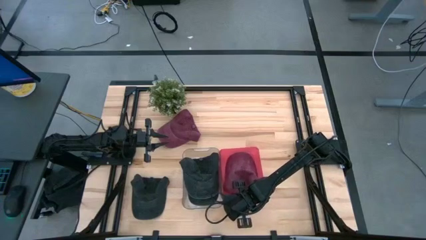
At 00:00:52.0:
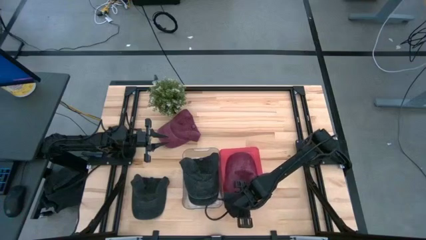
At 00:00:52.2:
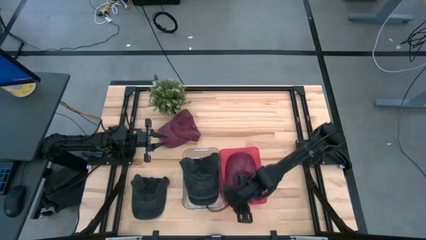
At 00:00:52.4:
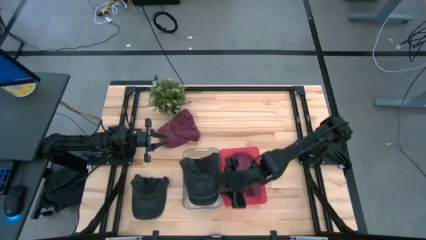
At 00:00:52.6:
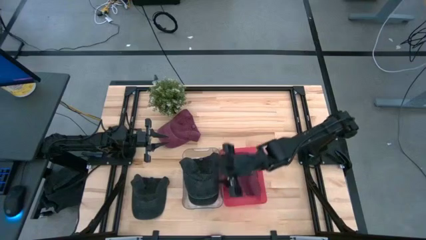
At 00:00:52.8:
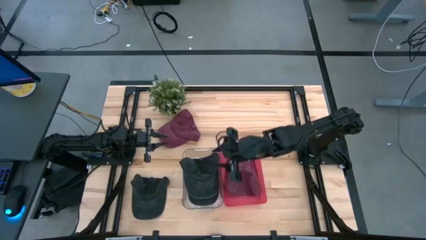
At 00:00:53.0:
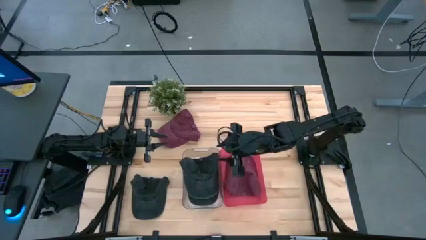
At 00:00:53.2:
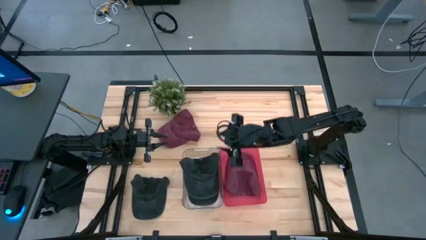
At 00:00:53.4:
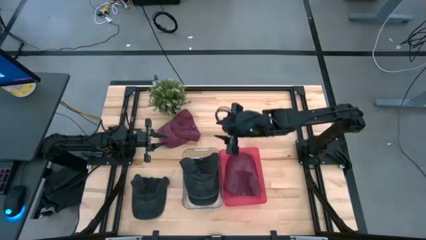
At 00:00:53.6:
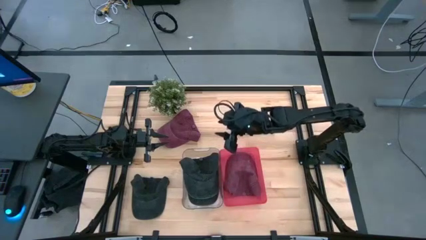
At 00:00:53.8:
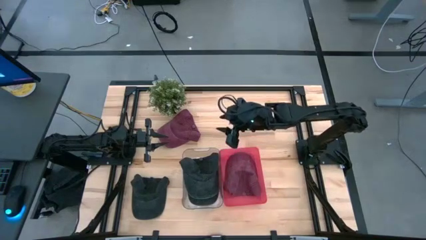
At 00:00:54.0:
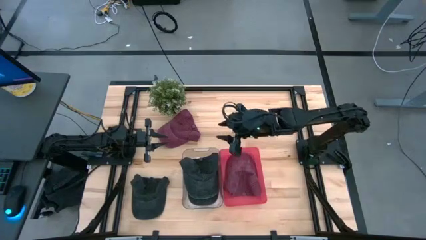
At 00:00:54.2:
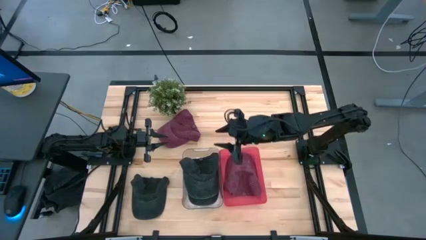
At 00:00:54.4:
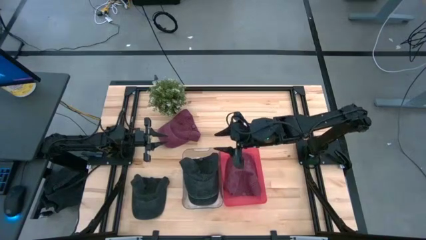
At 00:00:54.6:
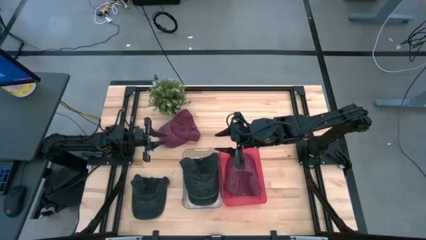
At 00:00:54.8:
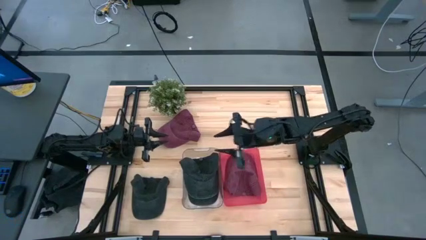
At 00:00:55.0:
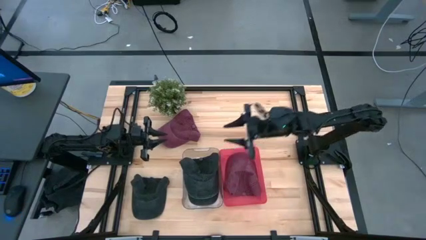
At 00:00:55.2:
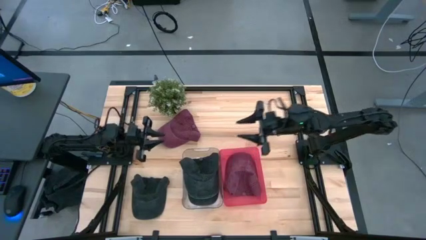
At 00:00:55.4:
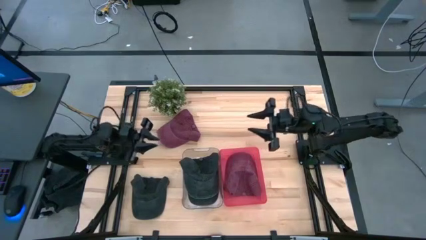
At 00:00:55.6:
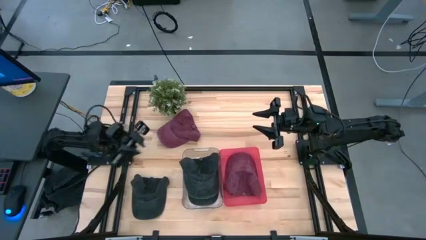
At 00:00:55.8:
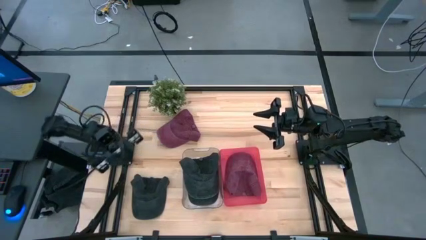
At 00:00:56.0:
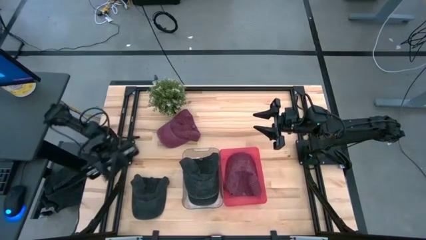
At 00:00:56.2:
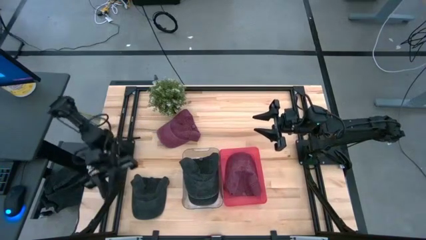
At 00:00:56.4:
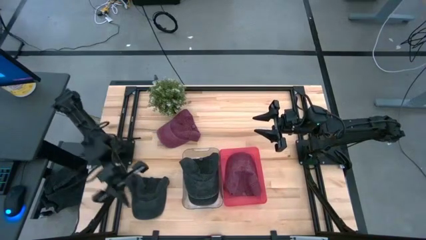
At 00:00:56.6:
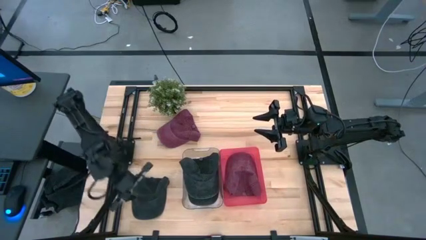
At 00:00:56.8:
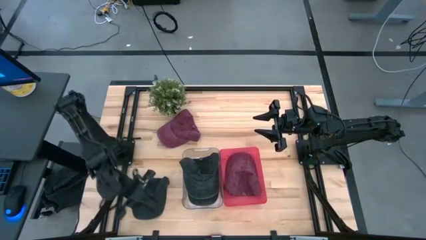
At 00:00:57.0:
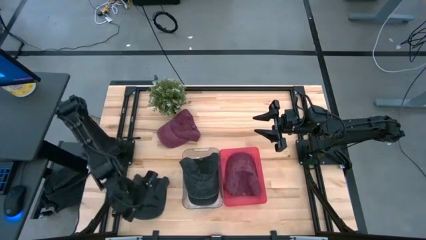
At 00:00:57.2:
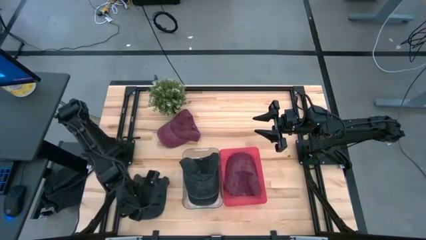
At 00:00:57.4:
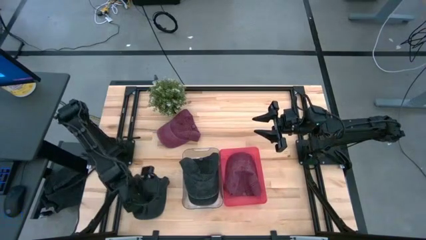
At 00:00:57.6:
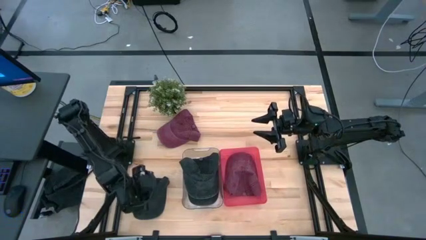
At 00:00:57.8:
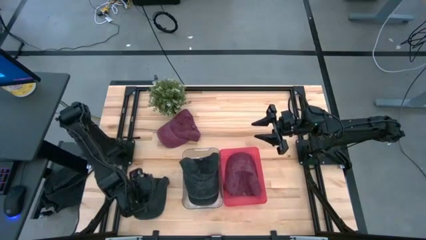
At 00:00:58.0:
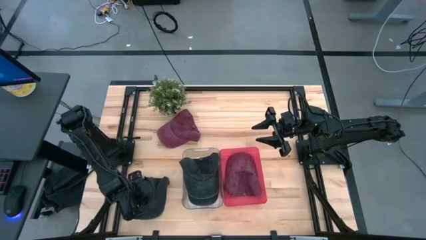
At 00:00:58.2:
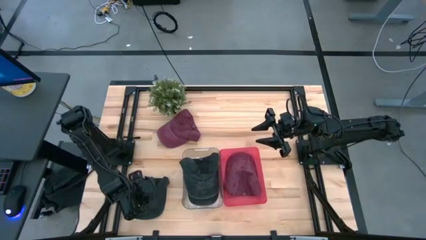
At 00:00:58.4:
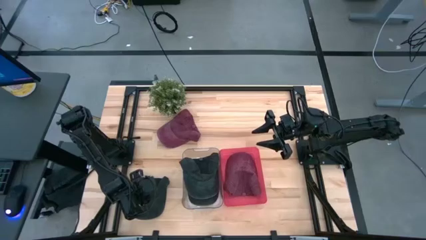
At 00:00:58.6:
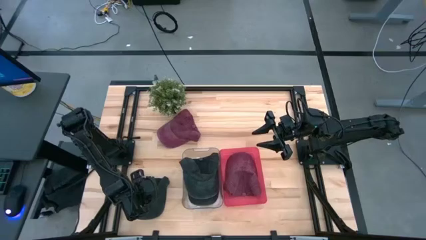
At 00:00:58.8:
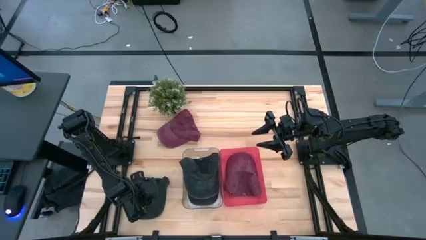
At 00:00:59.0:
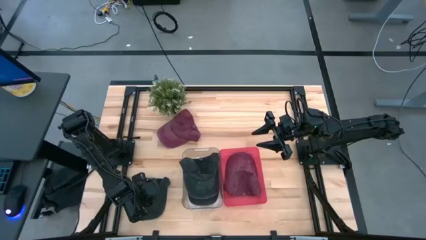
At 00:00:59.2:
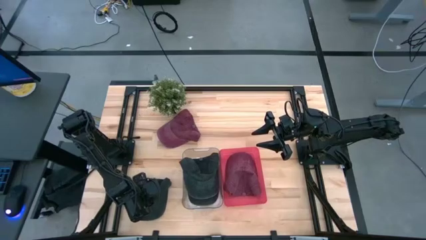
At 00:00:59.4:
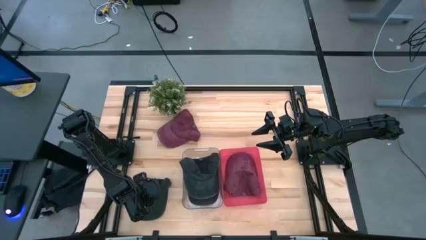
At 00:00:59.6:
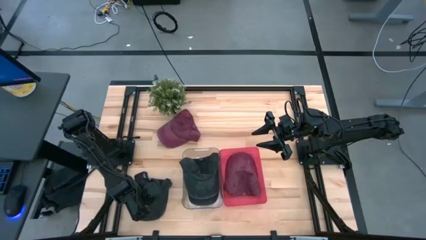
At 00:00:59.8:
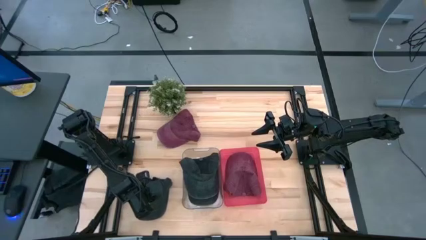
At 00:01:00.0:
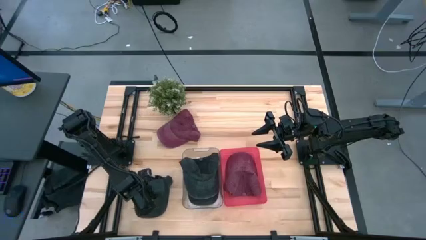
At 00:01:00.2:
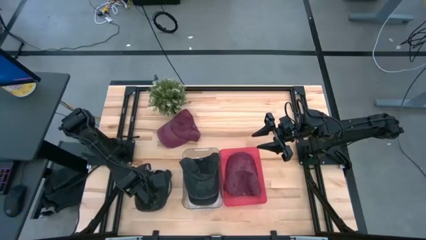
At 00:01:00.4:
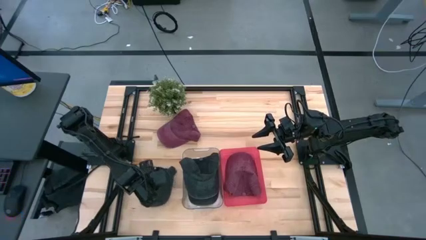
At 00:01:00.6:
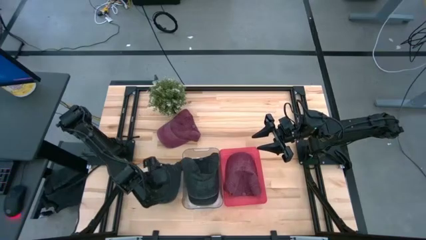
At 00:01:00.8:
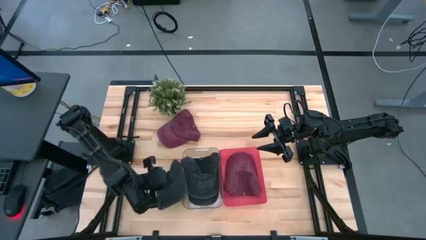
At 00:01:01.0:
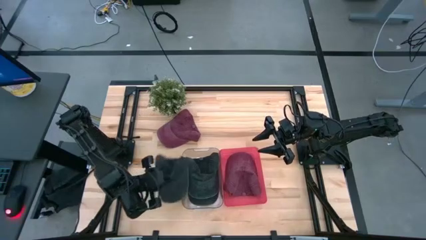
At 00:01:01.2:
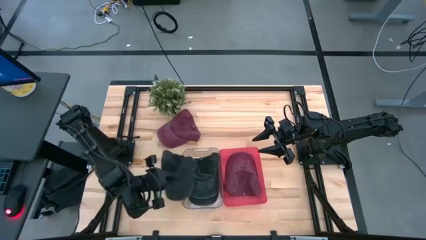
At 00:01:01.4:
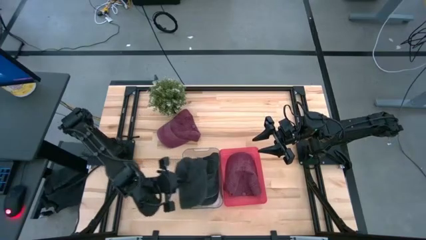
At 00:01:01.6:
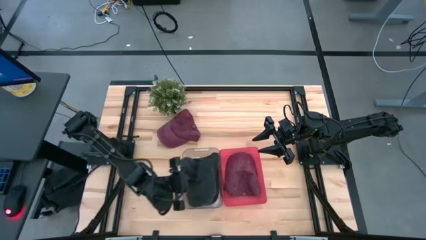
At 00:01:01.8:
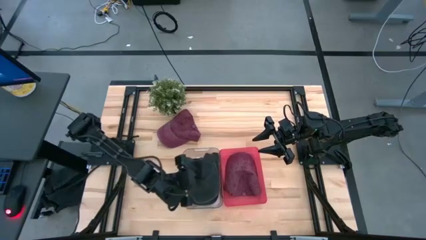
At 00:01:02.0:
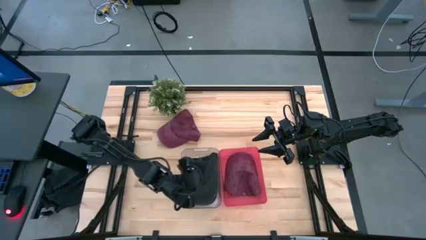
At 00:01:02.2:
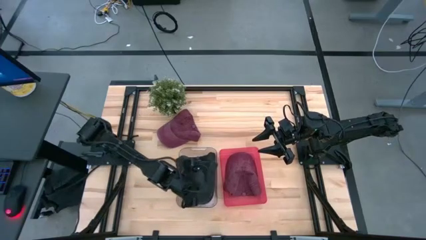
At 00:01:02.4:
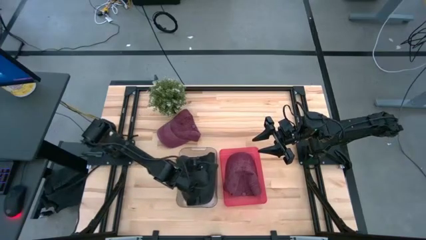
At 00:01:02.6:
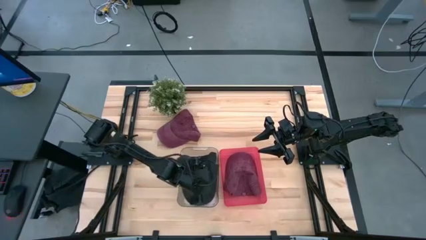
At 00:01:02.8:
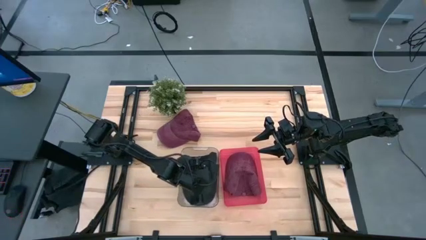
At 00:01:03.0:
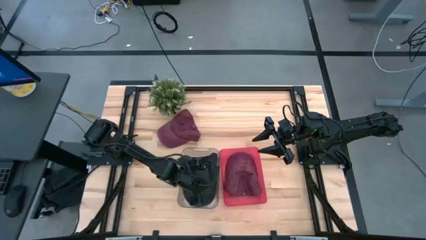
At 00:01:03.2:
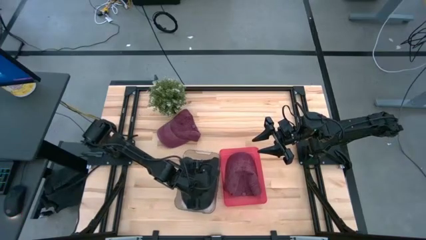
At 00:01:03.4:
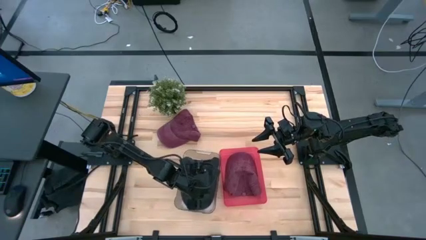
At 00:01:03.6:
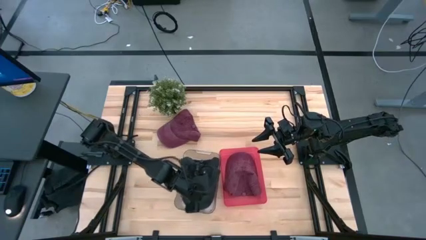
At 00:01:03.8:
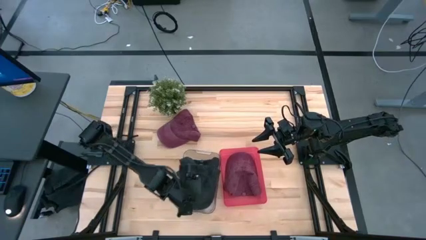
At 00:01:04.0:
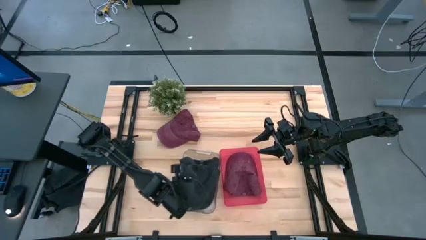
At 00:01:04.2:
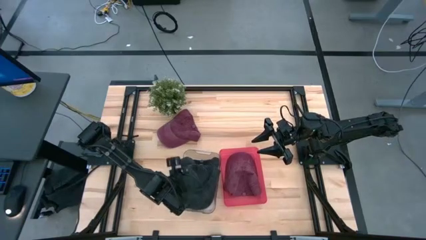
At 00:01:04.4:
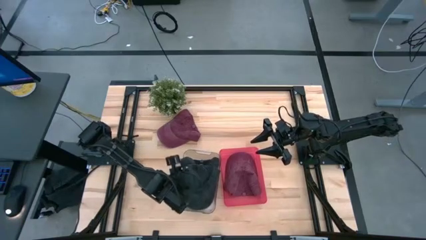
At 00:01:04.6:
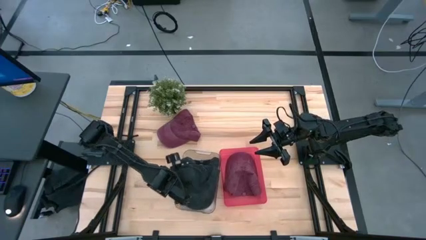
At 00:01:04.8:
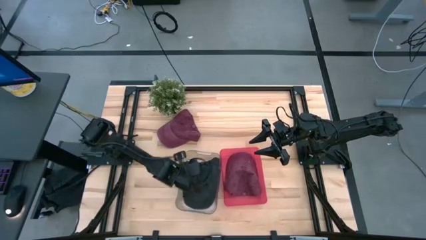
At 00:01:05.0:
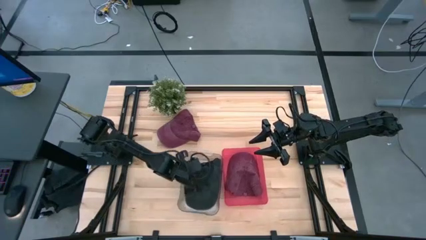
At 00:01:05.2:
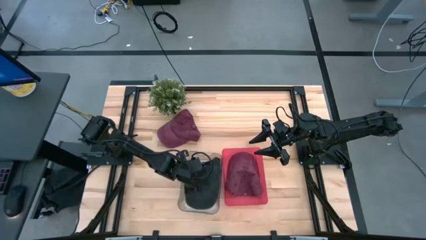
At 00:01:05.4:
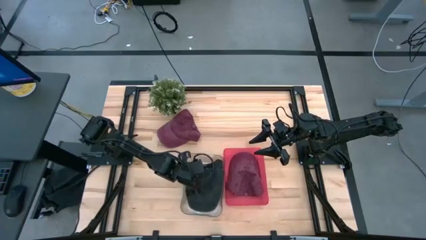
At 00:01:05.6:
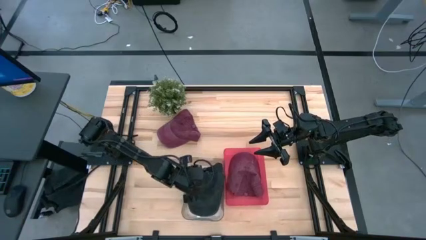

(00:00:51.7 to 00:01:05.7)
Task: Pick & Place hat
Put the black cap in the transparent bin

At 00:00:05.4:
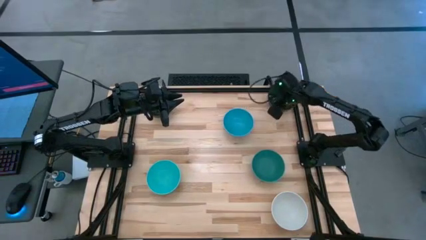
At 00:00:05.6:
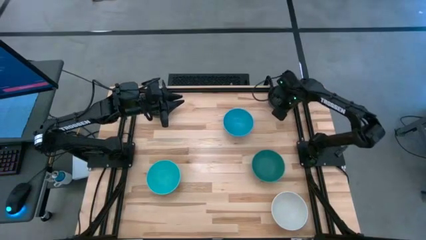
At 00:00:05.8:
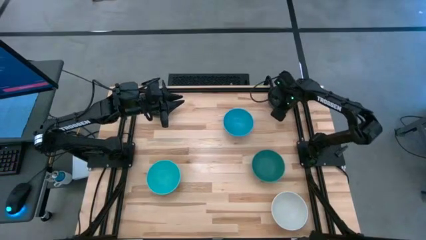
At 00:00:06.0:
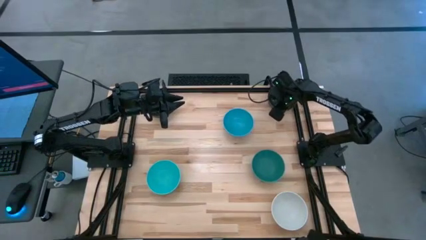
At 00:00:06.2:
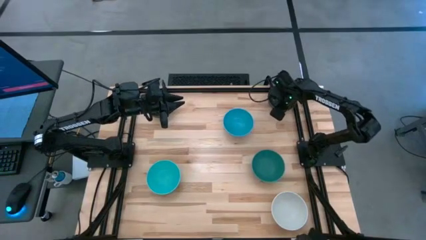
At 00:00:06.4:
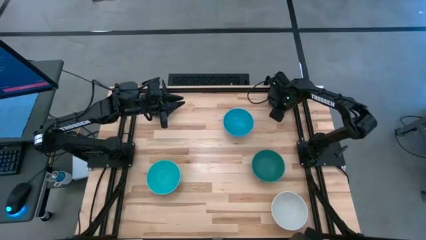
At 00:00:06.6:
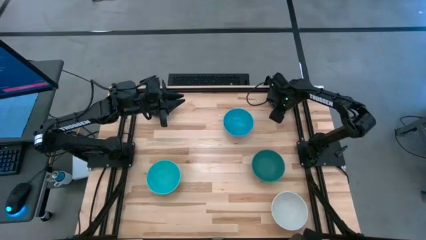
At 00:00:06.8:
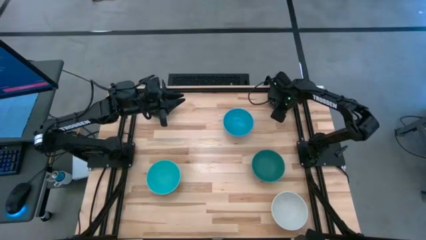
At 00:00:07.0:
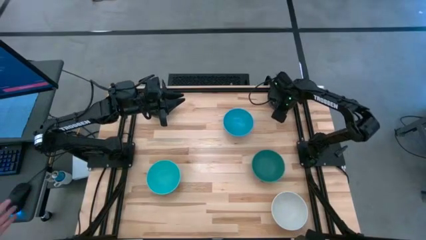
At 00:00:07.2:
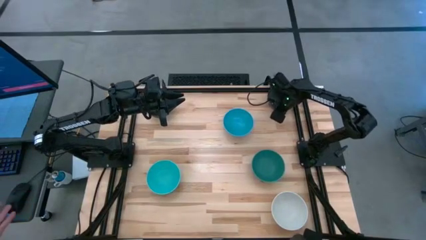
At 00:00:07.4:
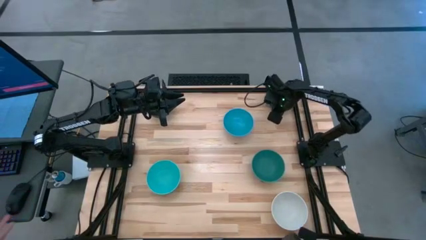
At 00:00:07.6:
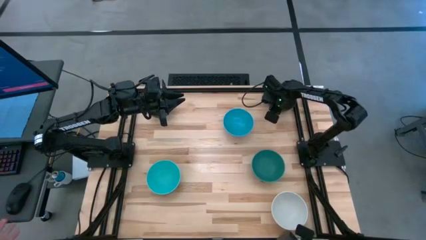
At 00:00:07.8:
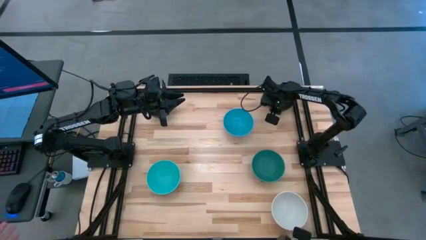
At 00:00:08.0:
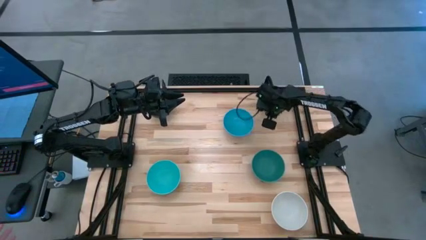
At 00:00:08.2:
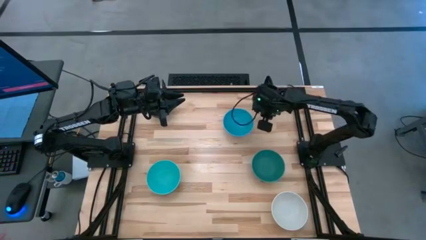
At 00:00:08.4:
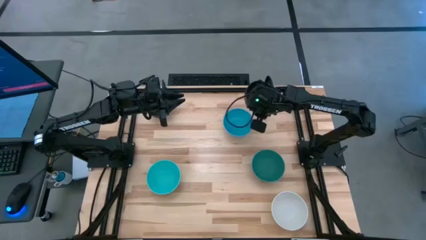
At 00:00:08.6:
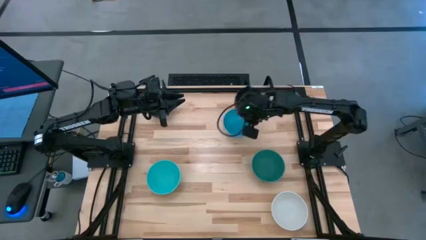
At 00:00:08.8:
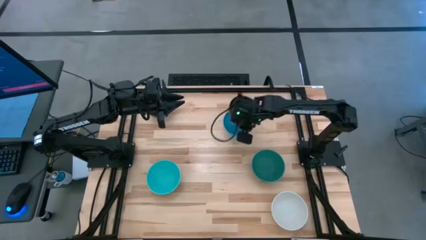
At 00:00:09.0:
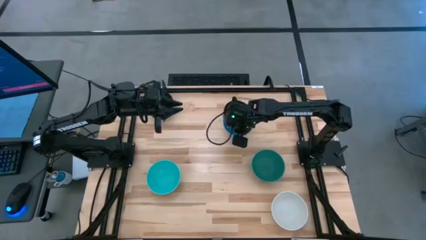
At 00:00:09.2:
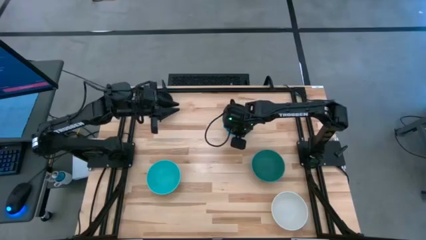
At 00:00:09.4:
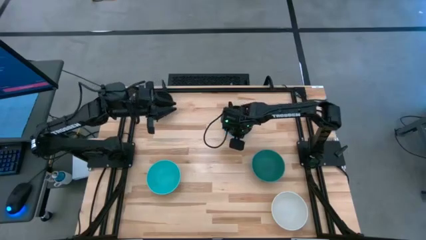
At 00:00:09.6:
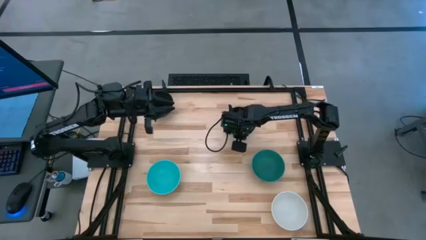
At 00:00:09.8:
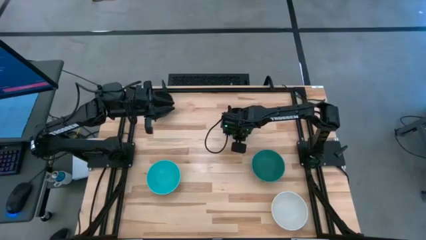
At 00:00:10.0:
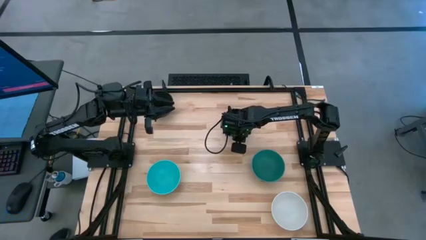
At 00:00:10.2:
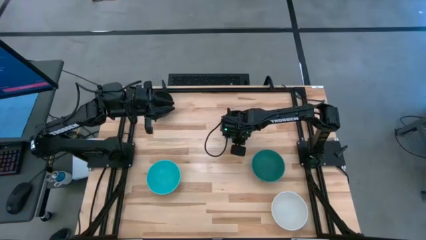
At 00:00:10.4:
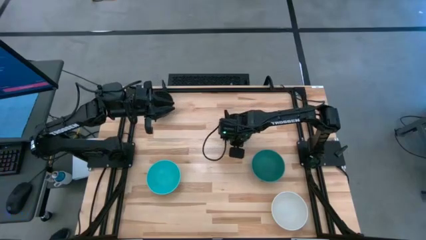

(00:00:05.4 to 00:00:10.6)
Task: Nest bowls inside each other
Stack the right black bowl on the blue bowl
